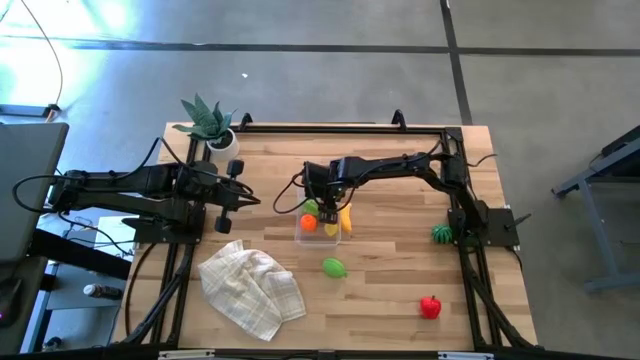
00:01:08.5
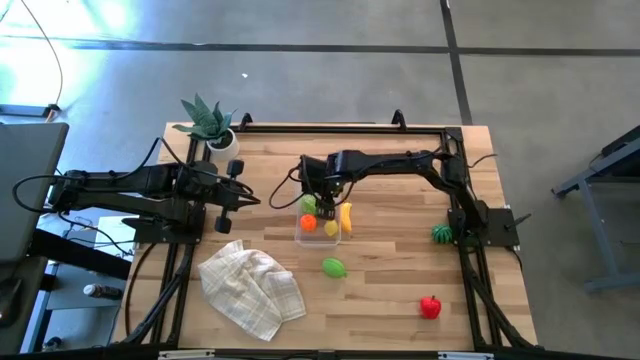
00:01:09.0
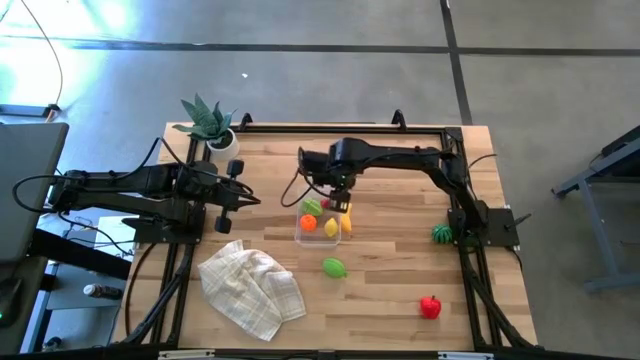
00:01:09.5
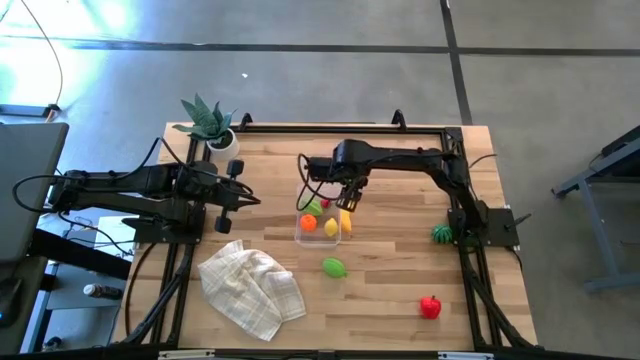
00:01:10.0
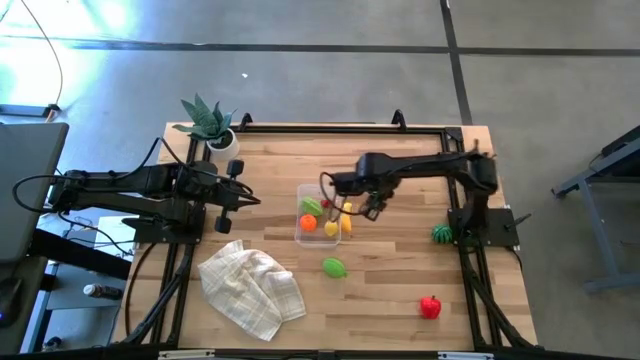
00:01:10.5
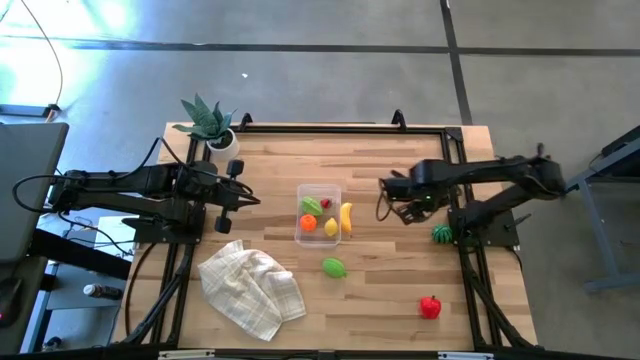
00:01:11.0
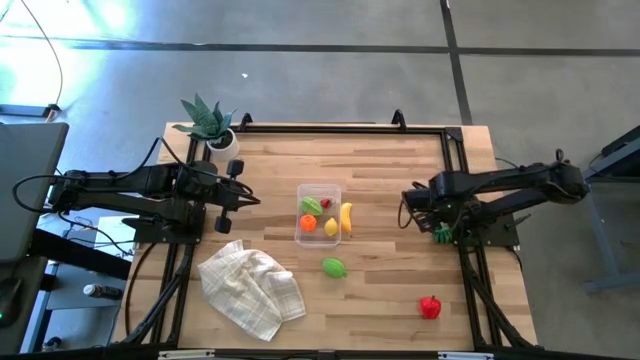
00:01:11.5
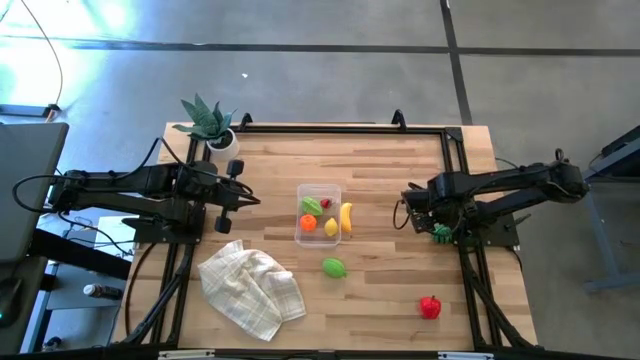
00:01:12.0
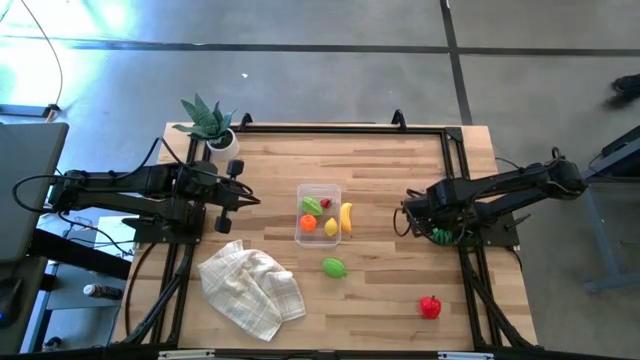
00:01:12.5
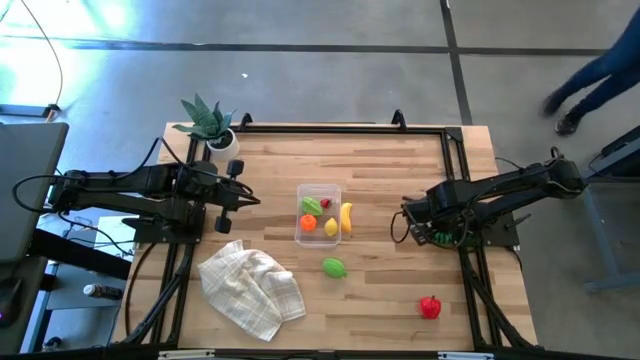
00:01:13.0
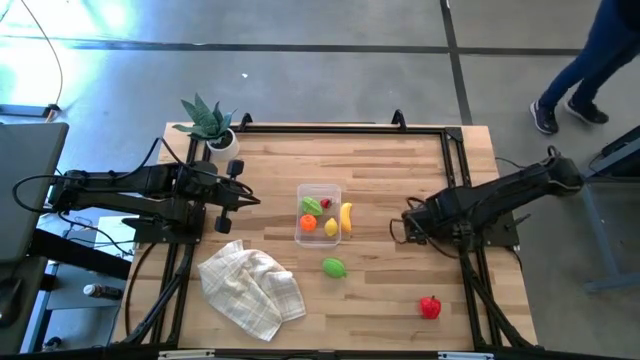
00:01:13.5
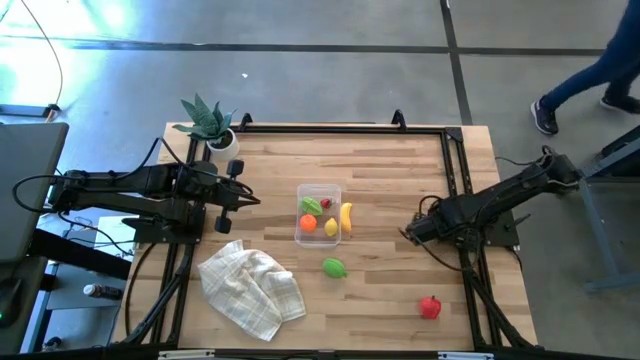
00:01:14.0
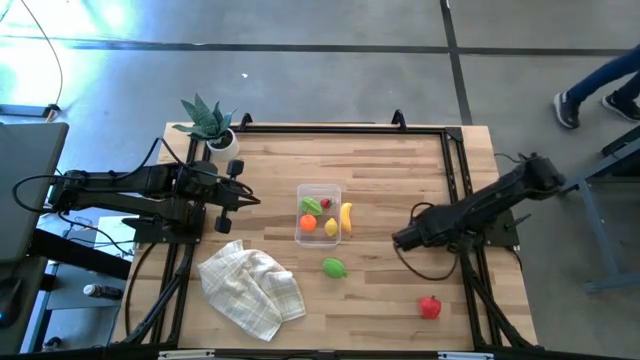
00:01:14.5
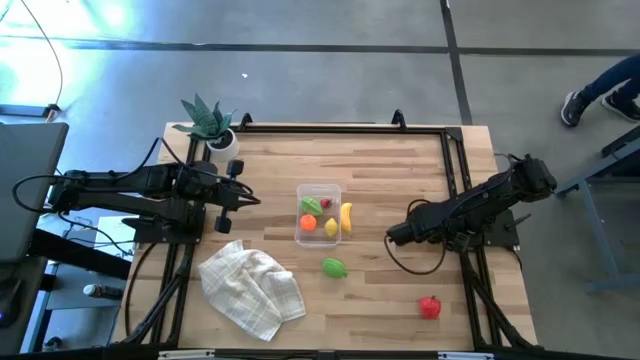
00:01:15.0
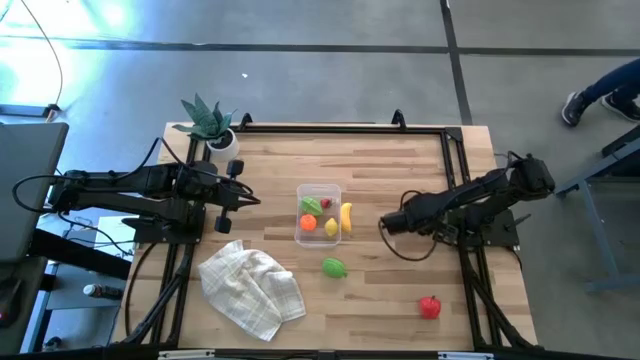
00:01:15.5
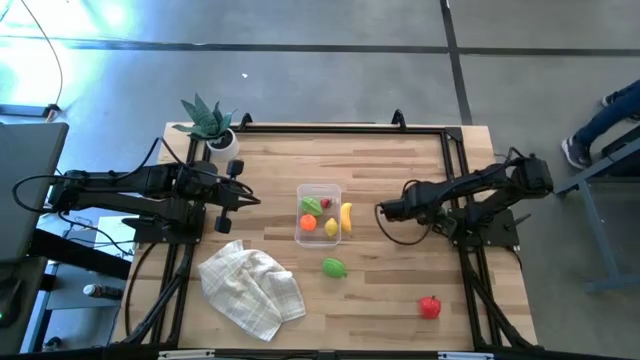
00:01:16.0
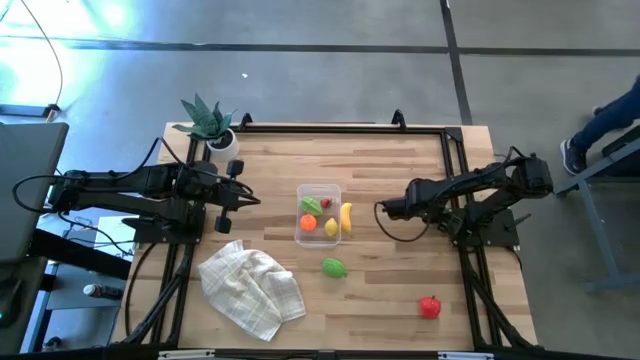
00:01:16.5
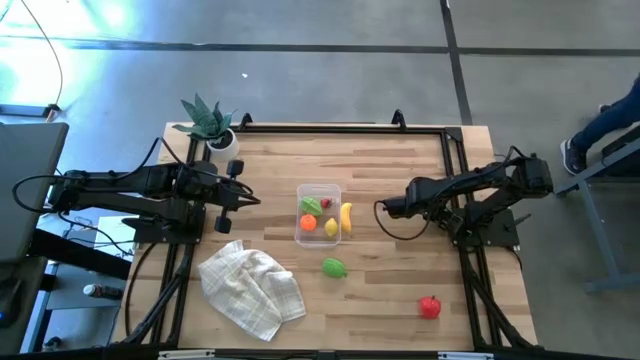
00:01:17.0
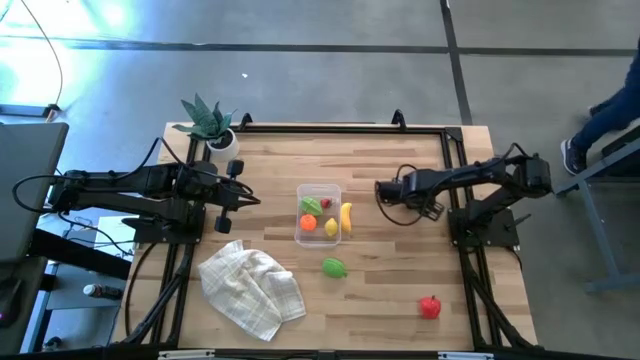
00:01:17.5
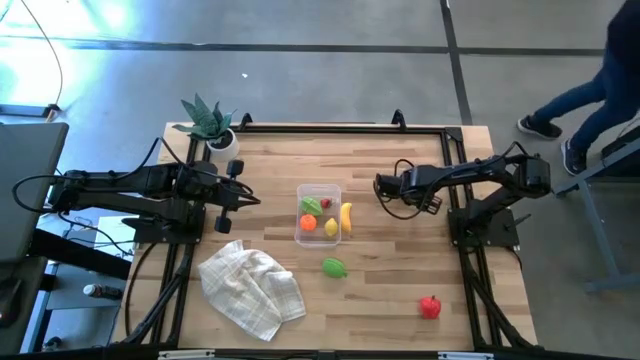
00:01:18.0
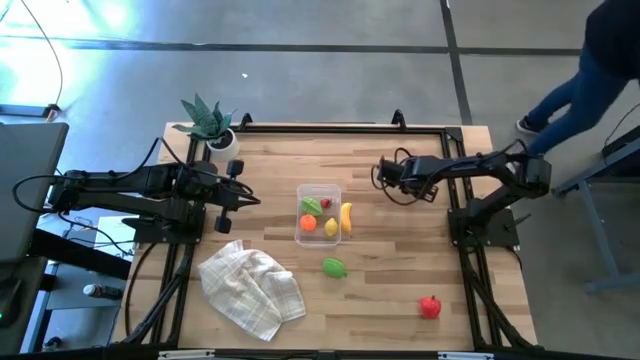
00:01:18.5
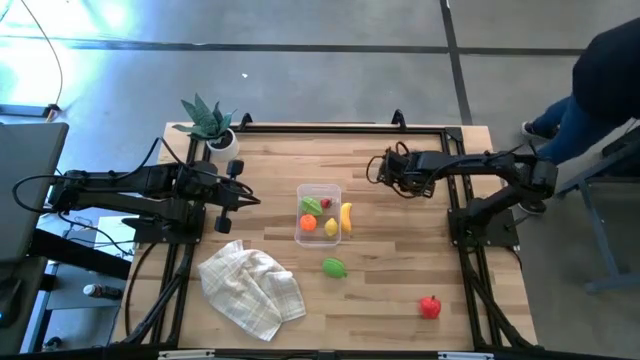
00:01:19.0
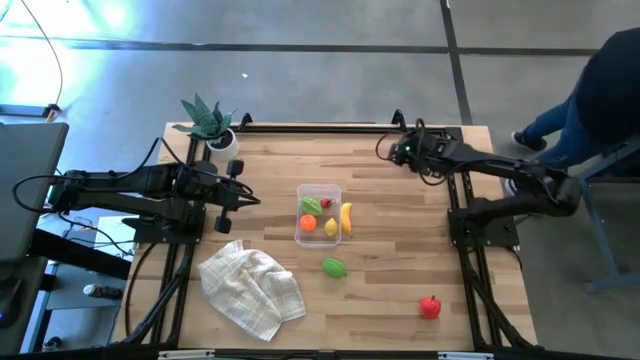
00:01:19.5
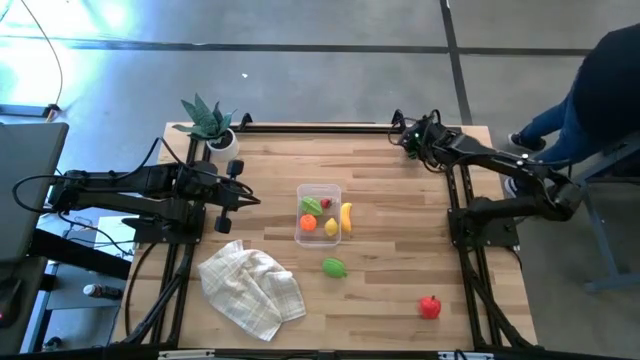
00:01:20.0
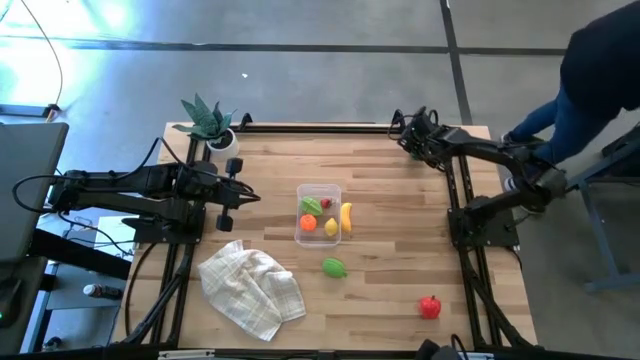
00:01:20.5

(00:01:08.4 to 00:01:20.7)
Task: Pick and placing Produce into tupperware
Put the green watermelon into the transparent bin

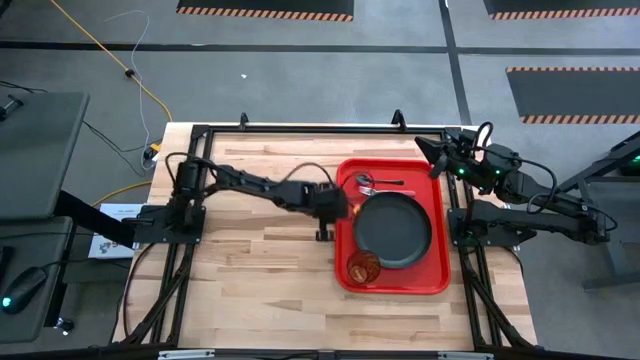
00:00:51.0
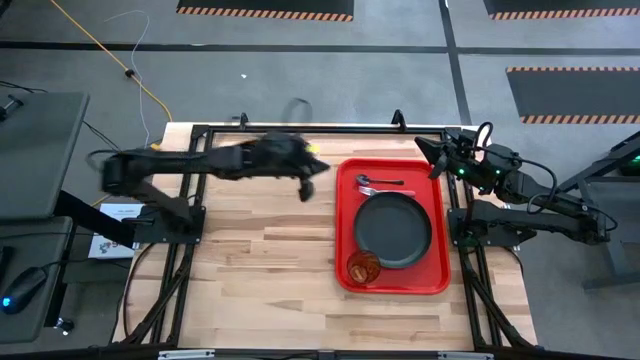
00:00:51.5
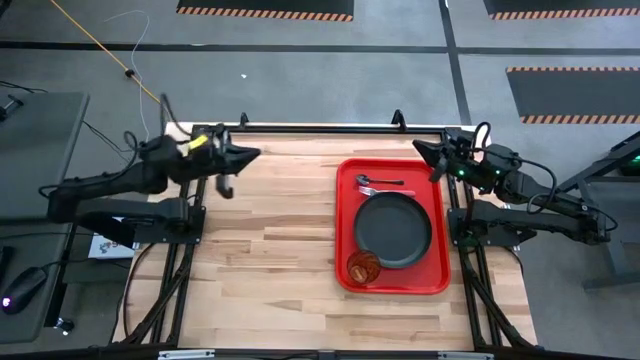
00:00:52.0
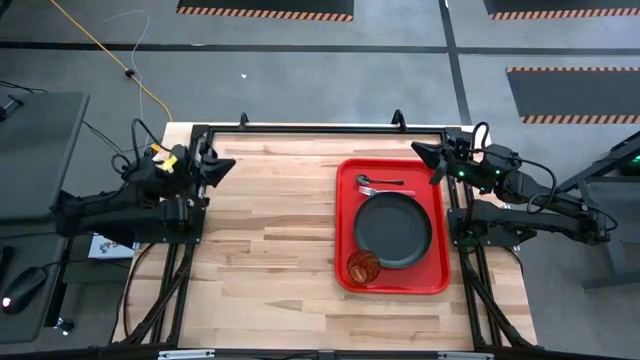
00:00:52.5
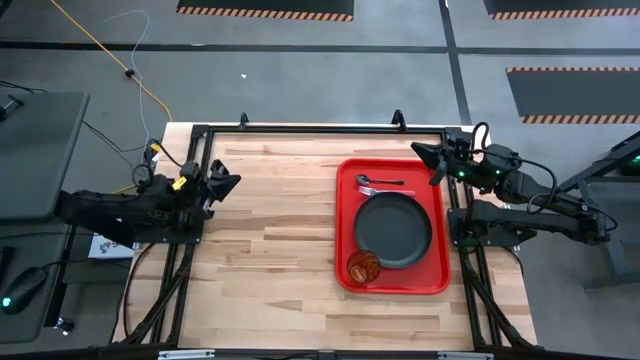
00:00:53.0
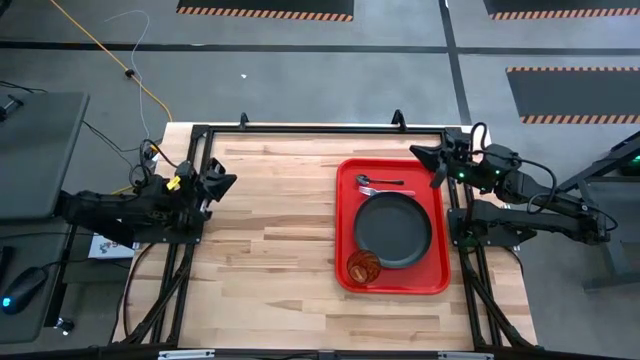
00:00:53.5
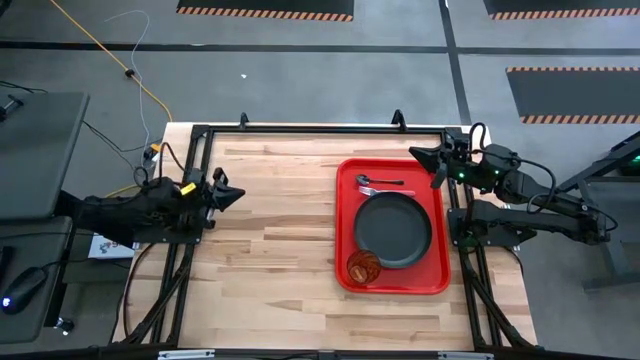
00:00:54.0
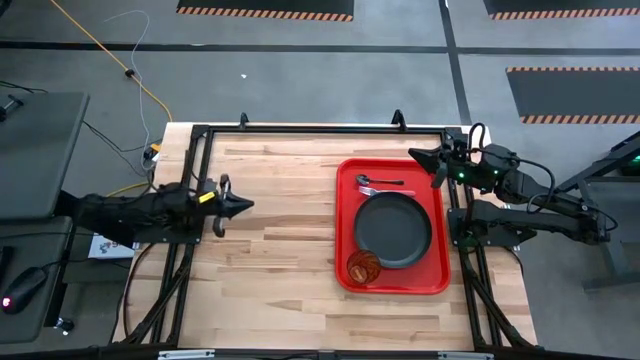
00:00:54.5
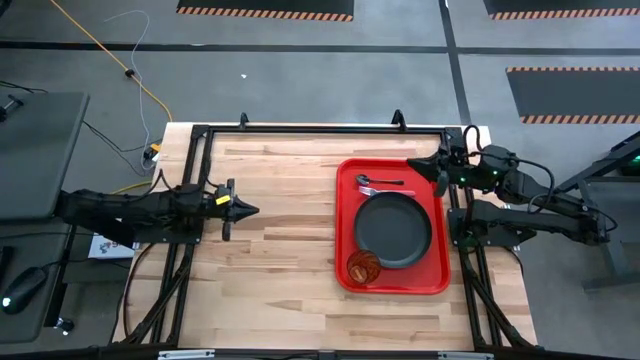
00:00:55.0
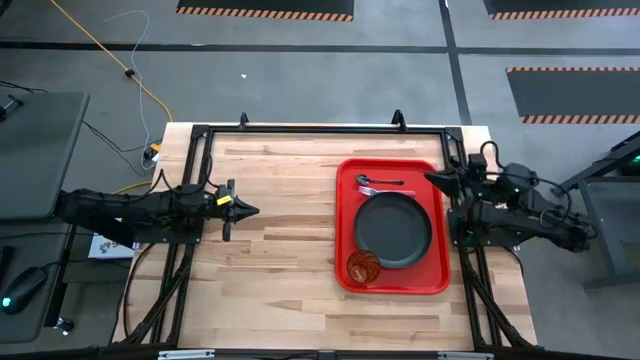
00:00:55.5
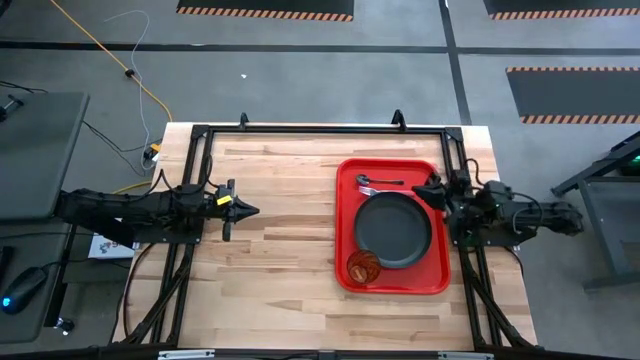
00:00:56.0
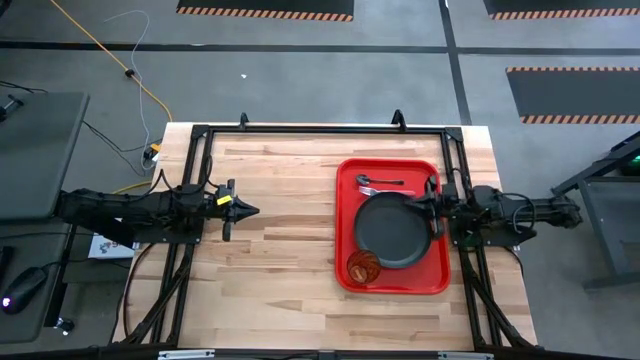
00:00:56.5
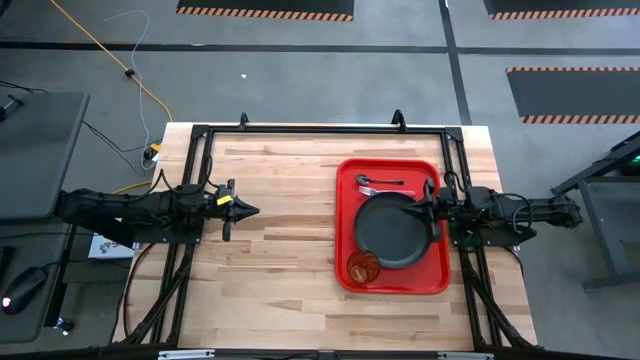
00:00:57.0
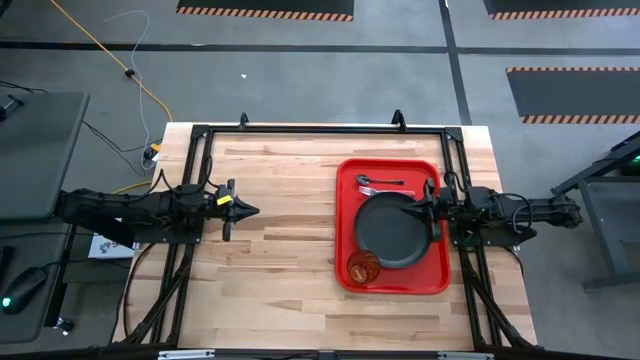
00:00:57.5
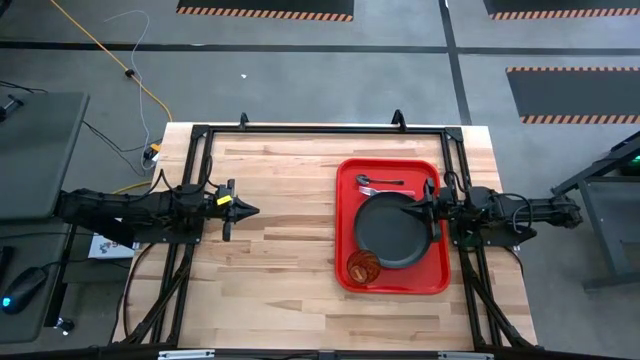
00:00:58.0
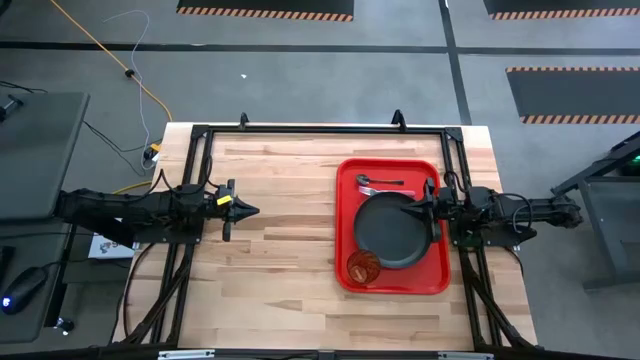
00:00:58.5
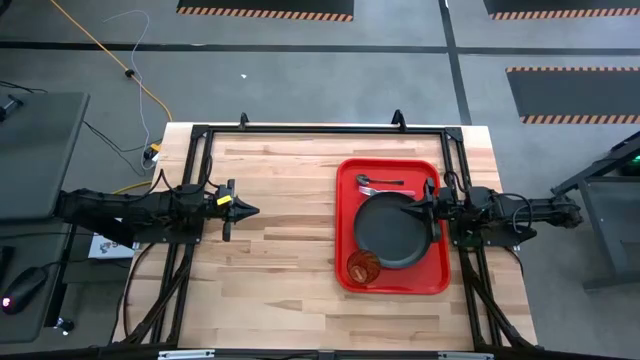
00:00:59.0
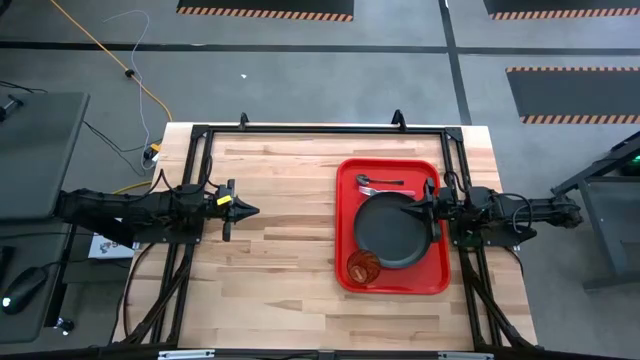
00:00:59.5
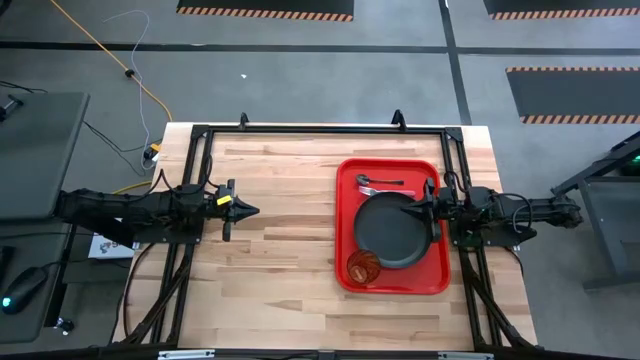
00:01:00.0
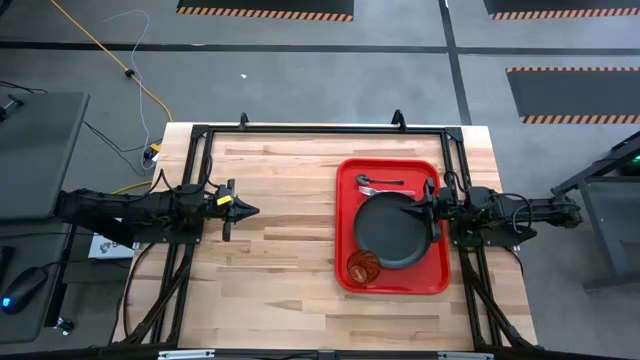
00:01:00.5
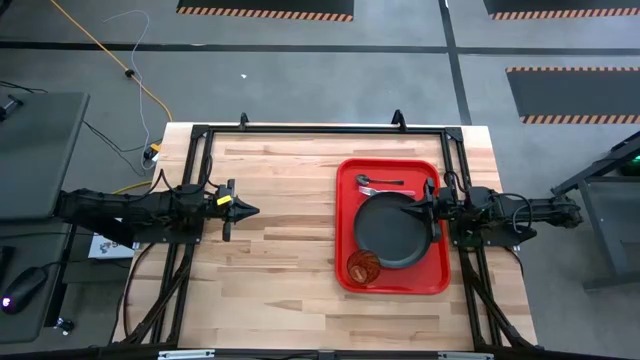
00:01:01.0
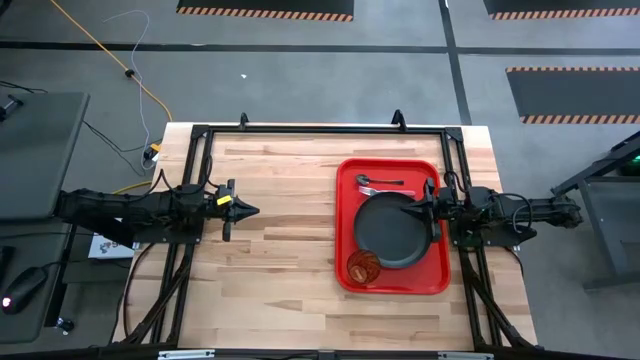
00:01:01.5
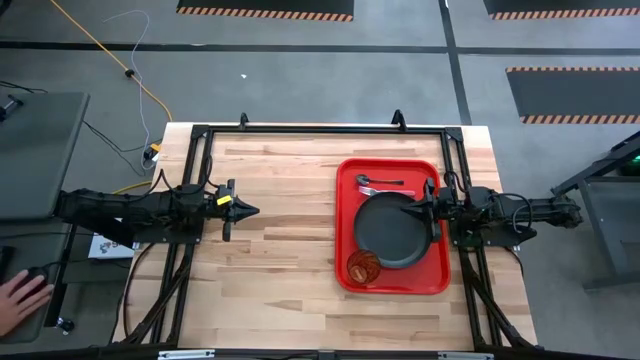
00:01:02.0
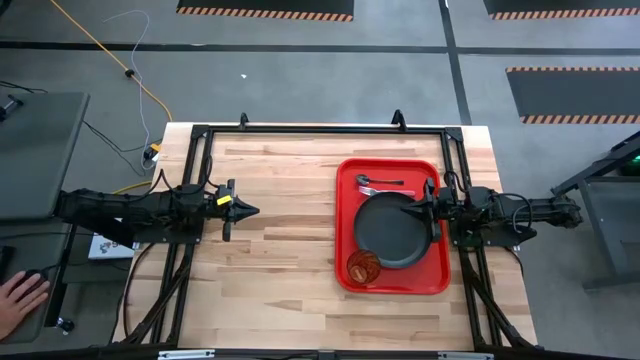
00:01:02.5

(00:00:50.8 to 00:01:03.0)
Task: Pick and place plate/cup/fork/spoon on tray
Return to Home Position
